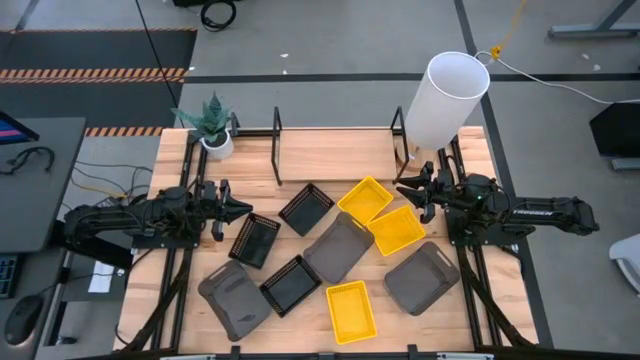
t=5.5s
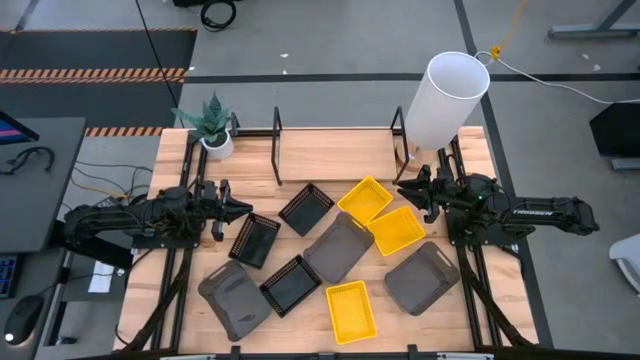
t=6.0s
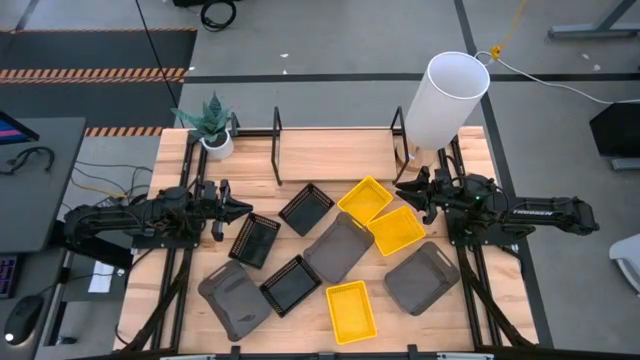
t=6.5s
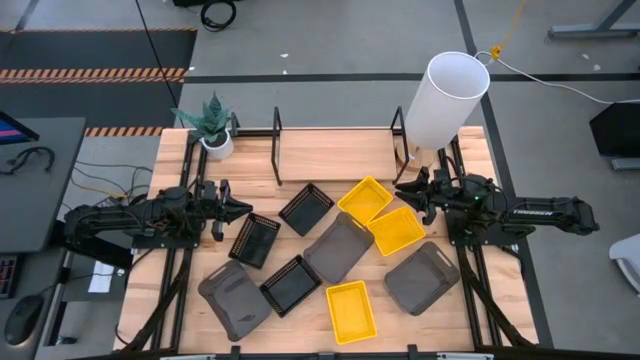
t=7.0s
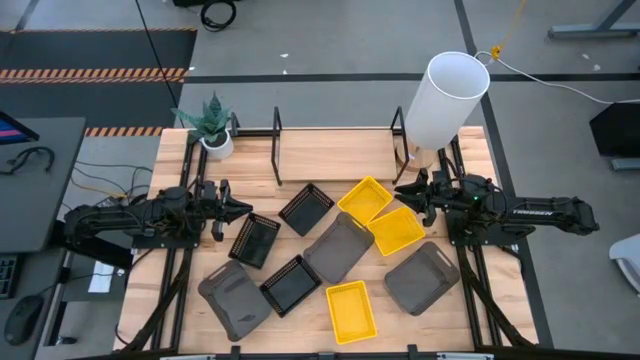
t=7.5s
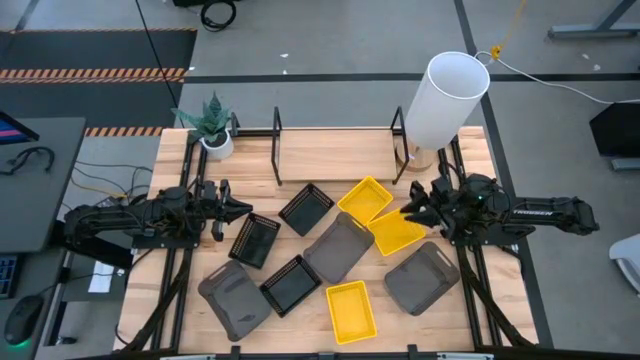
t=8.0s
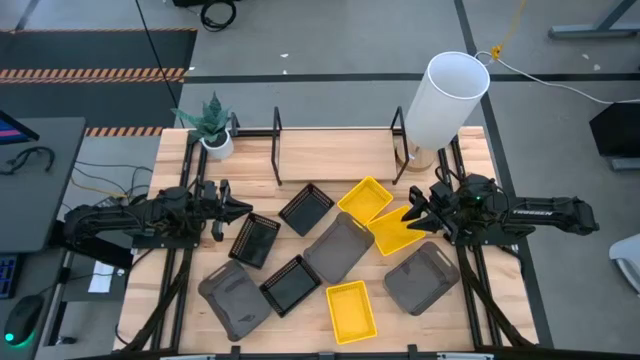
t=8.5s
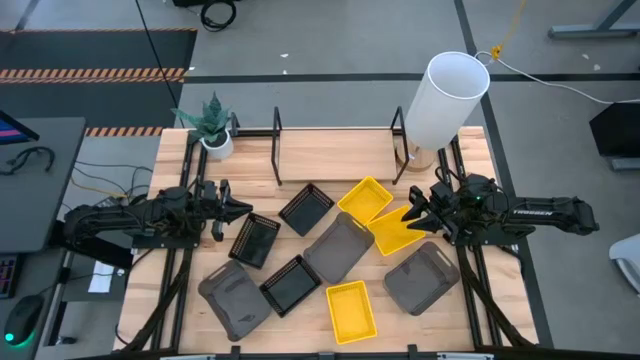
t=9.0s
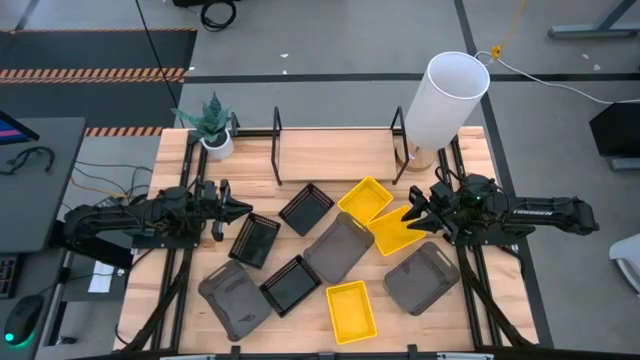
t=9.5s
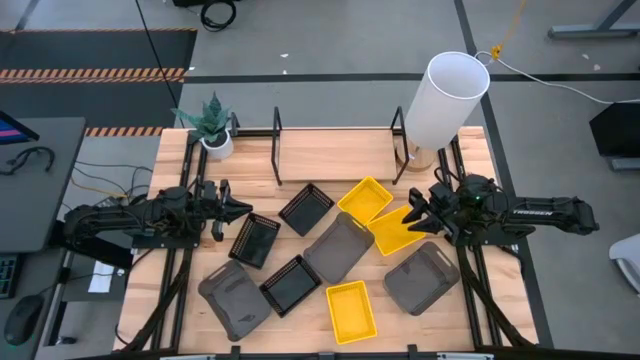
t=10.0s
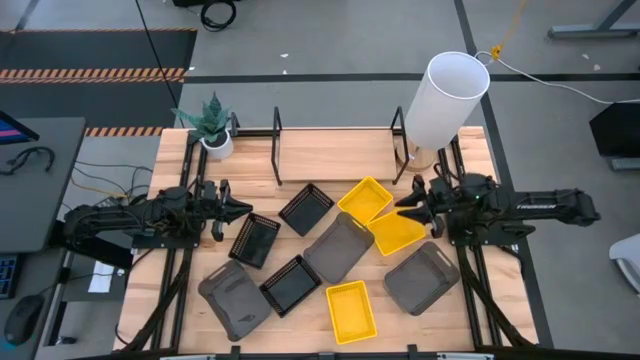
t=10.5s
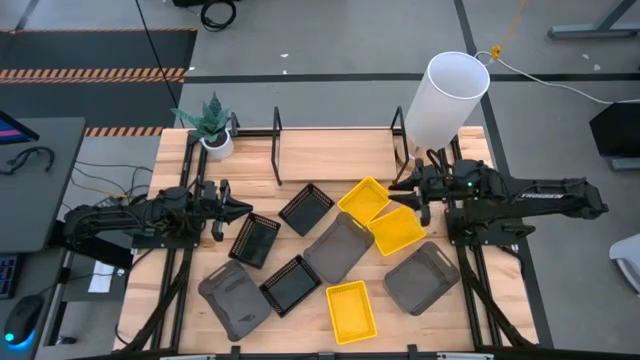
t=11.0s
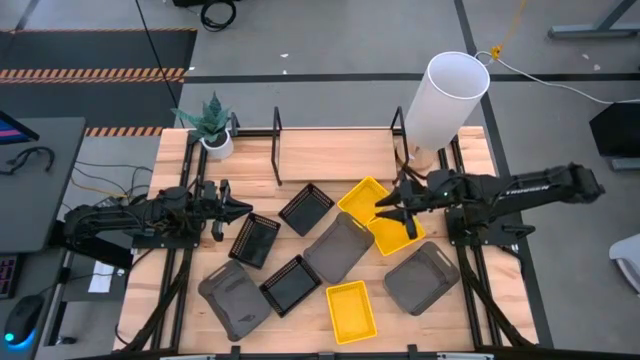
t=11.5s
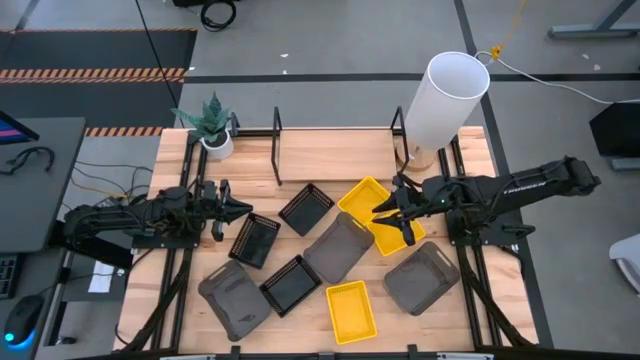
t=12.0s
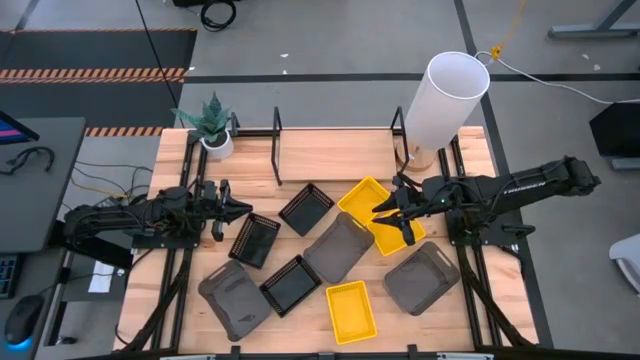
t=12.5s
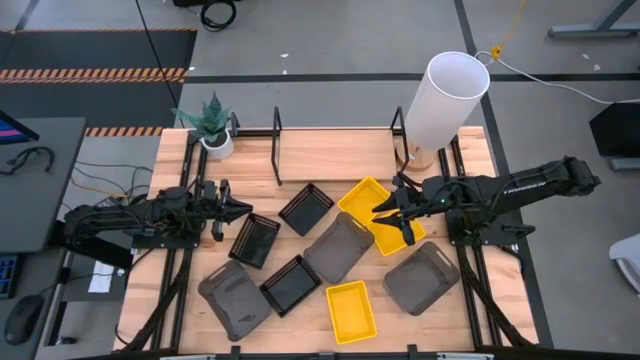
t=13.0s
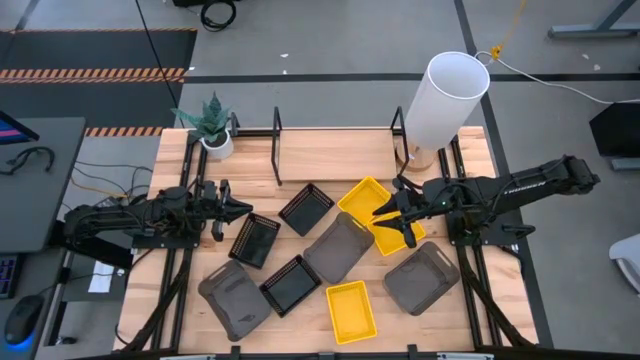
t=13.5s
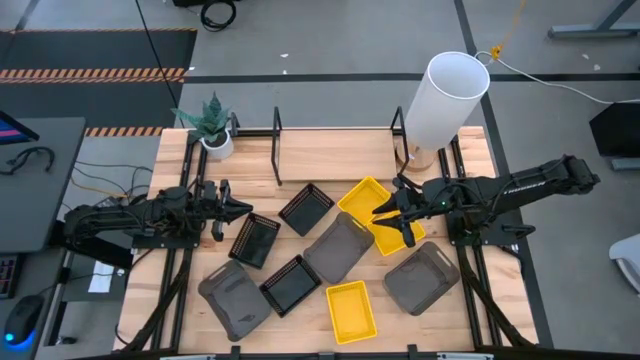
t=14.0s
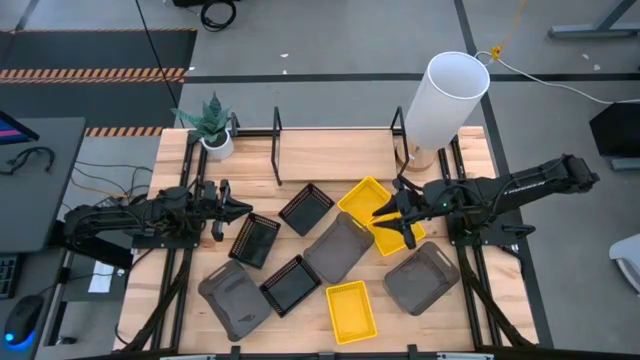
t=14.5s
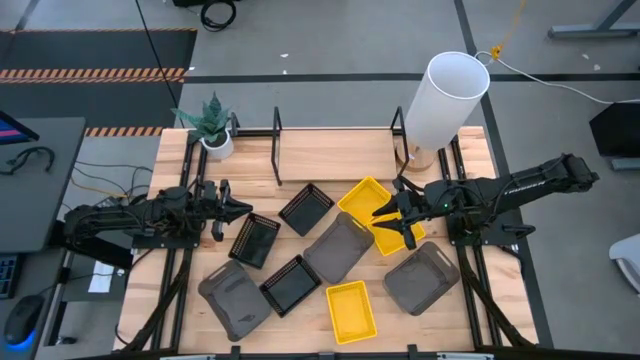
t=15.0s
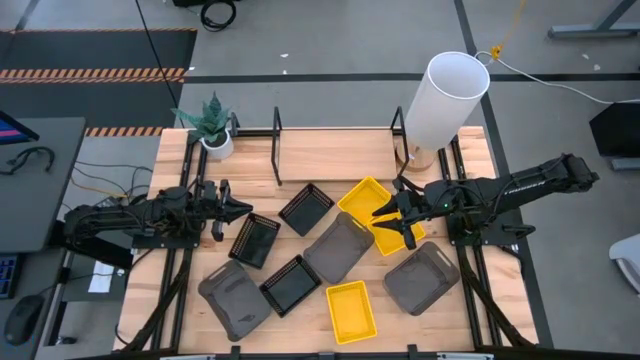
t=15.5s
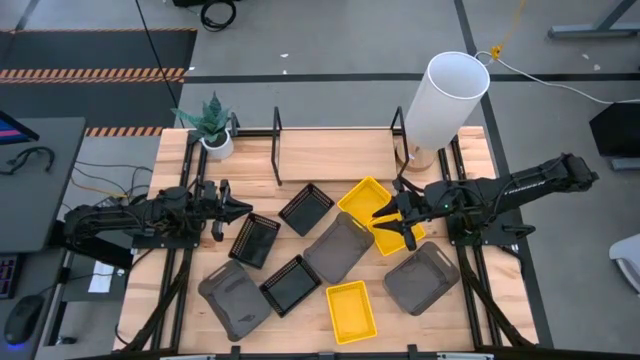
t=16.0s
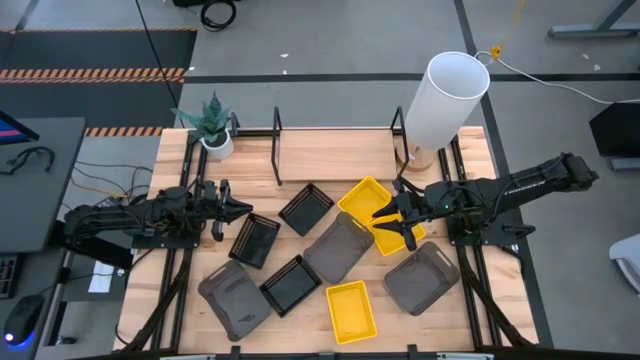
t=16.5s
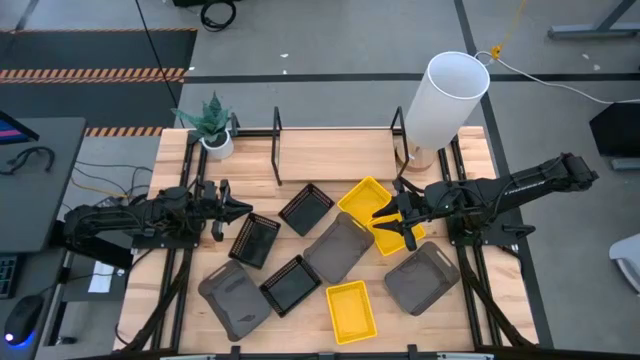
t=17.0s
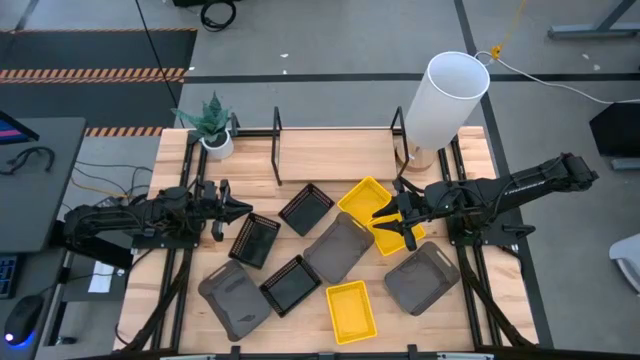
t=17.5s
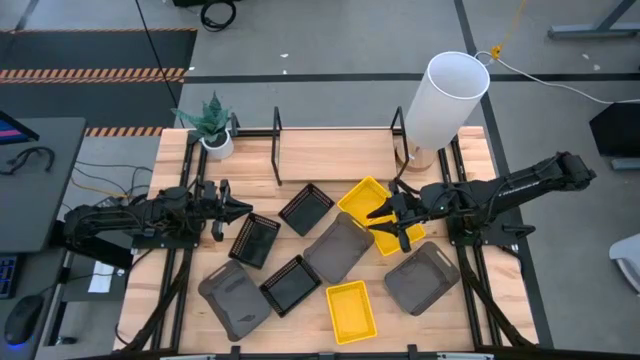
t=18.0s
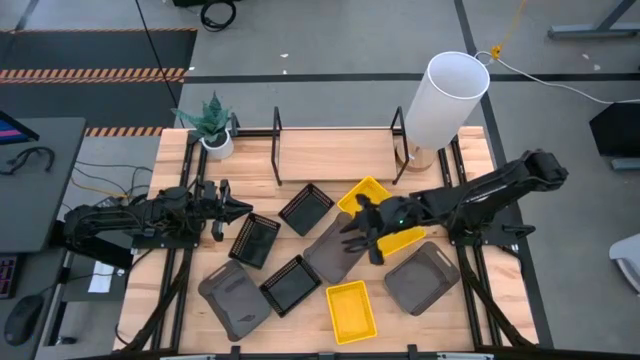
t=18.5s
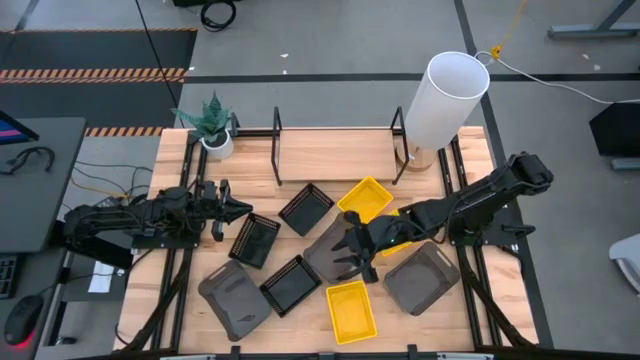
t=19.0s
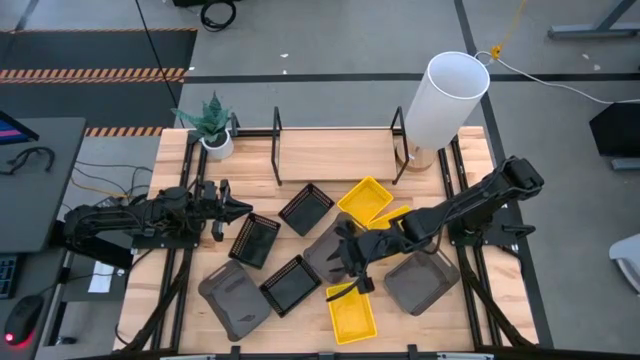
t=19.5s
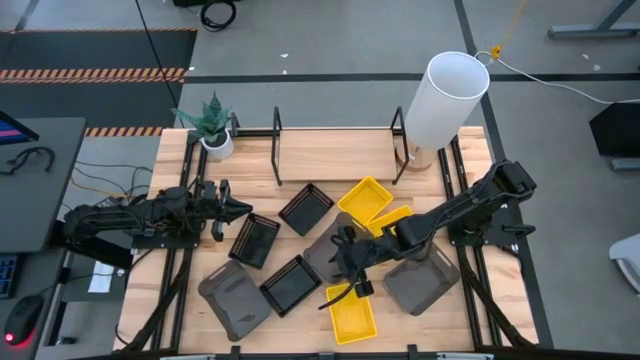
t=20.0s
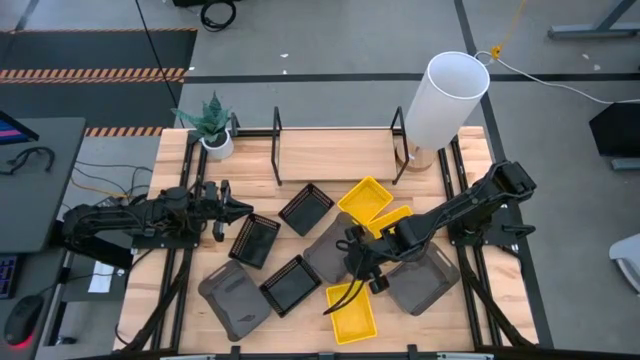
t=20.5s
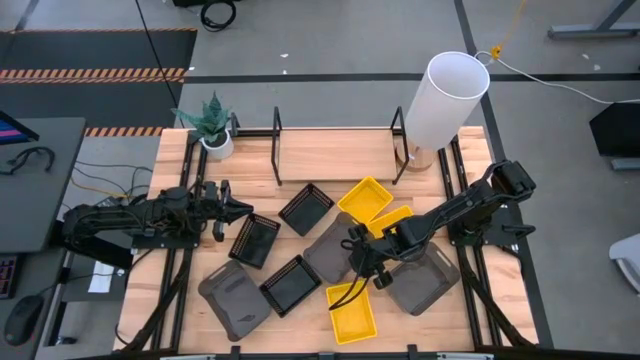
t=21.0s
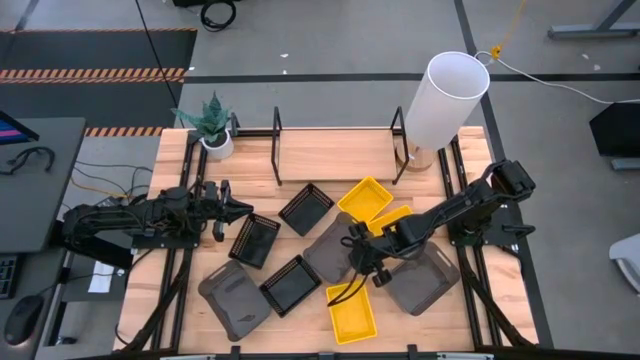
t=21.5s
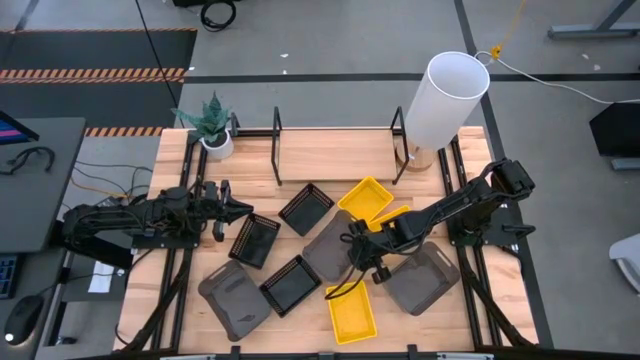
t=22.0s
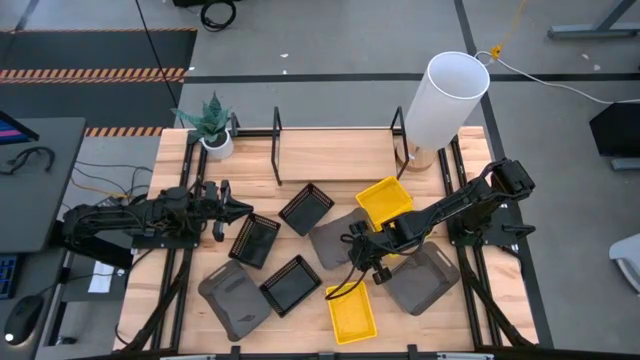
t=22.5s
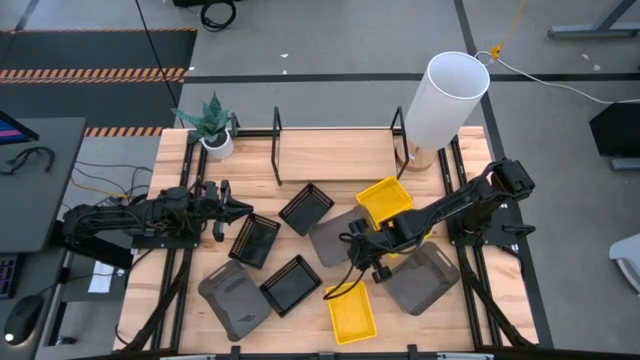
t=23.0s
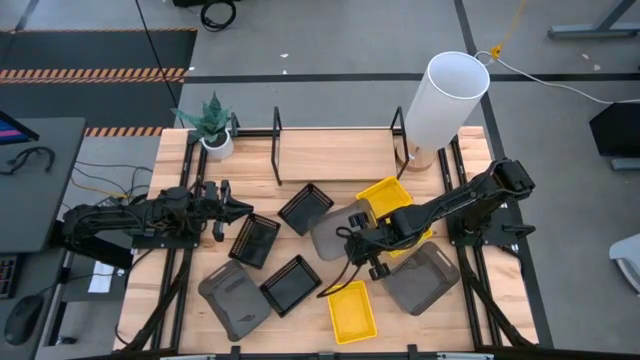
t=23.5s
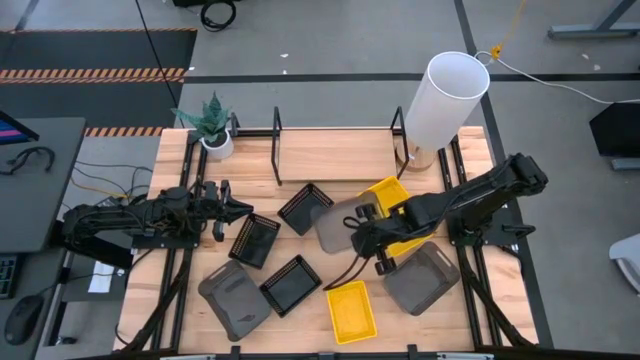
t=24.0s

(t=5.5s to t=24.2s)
Task: Stack baskets on shelf by color
Stack the middle black transparent bin on the right black transparent bin
